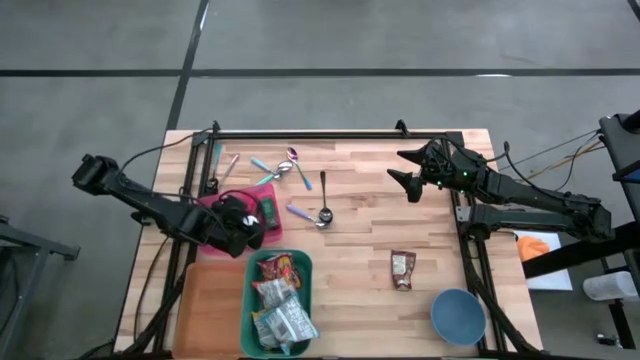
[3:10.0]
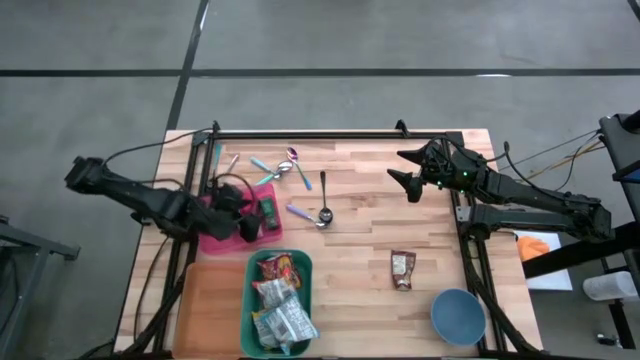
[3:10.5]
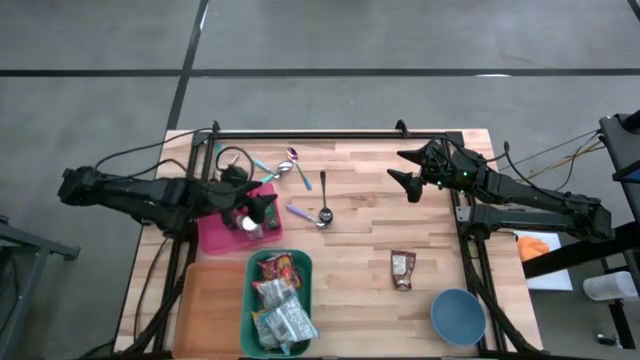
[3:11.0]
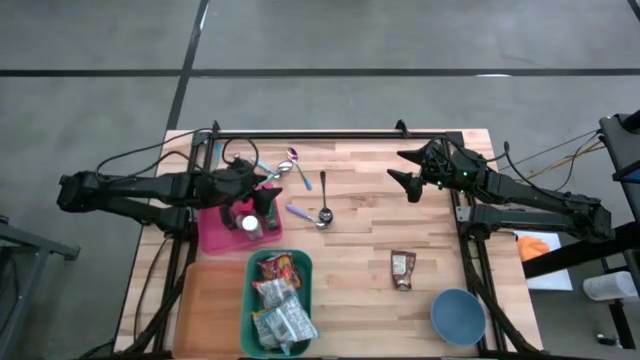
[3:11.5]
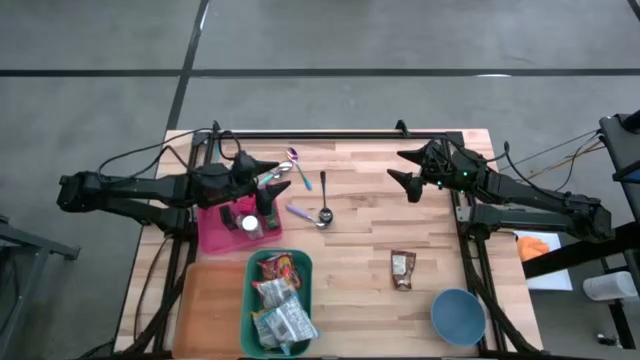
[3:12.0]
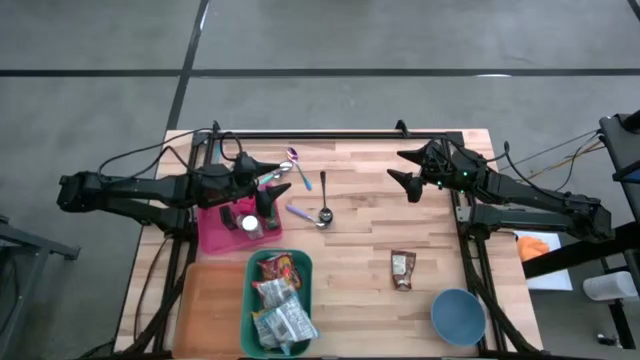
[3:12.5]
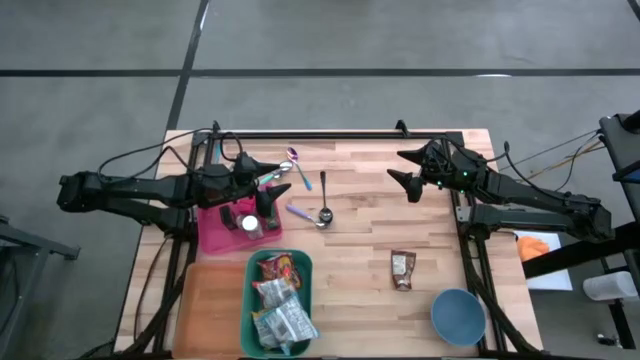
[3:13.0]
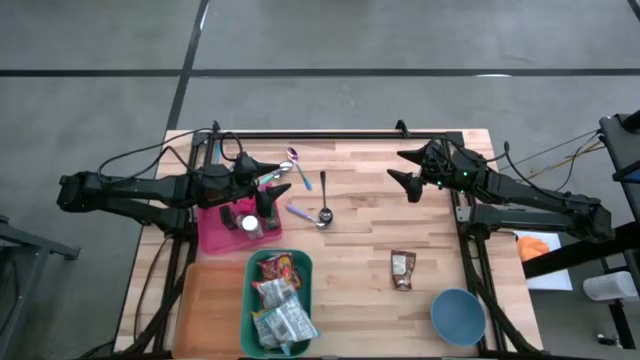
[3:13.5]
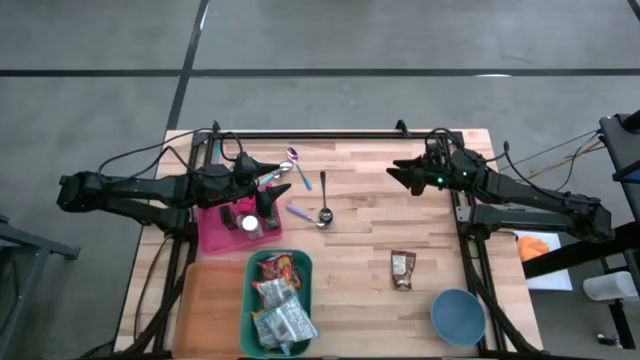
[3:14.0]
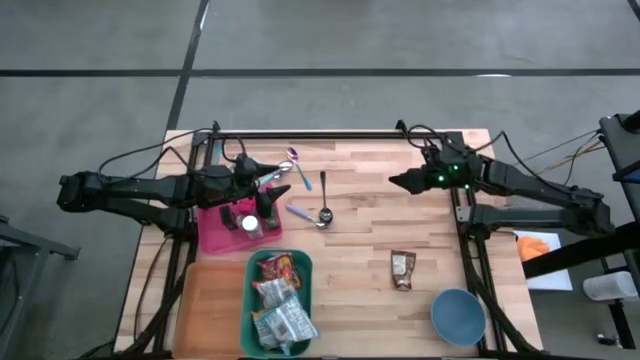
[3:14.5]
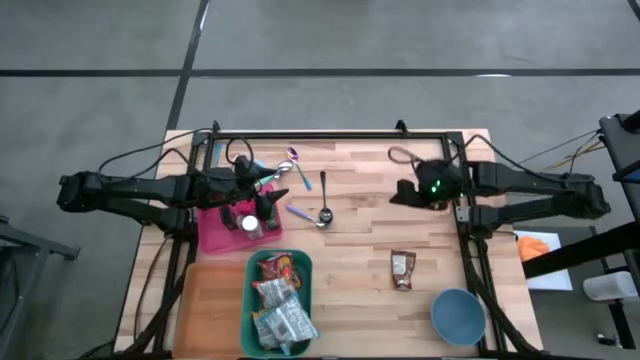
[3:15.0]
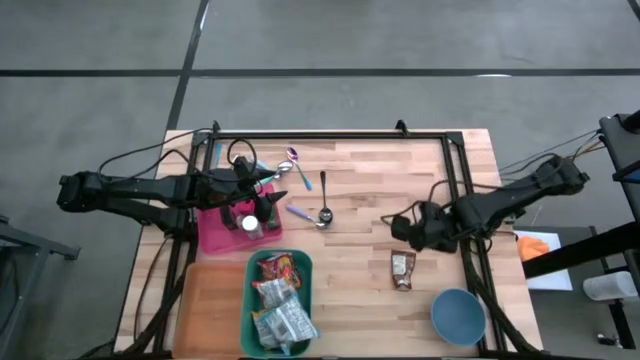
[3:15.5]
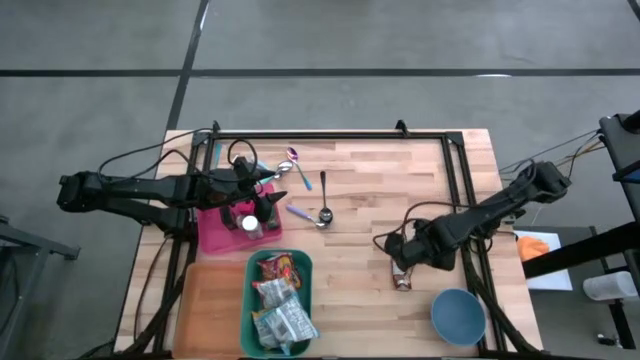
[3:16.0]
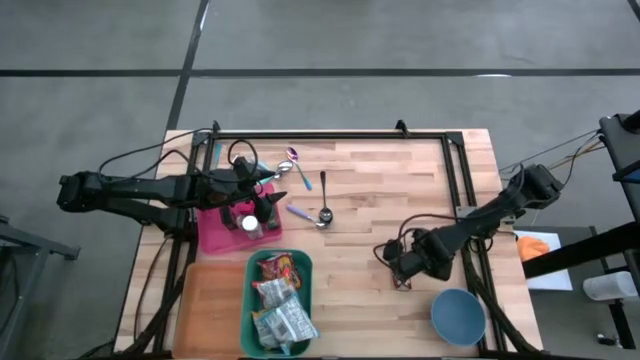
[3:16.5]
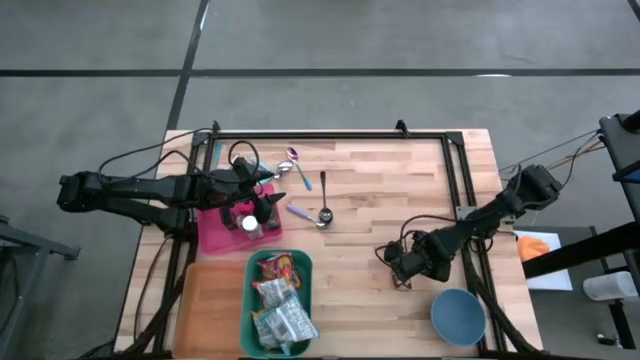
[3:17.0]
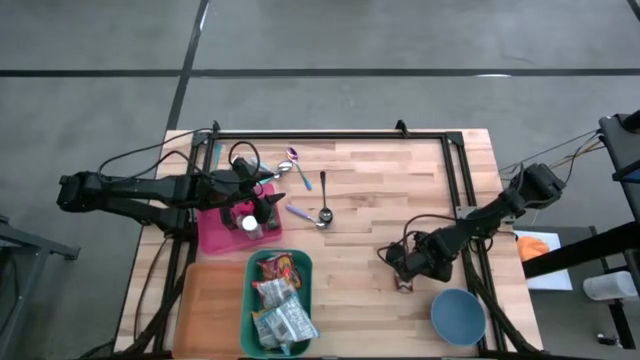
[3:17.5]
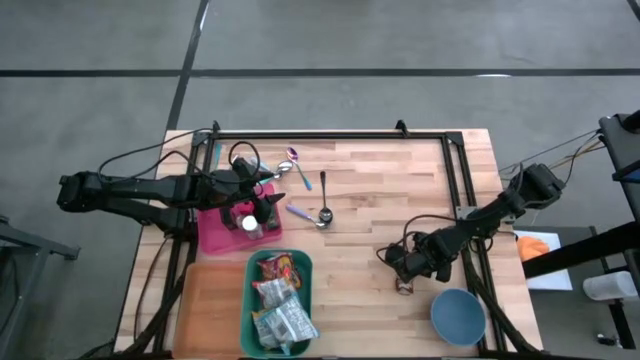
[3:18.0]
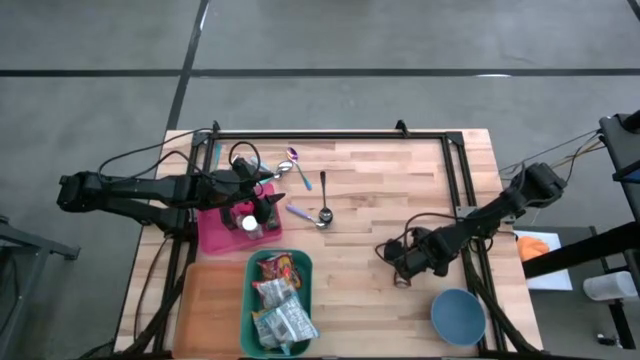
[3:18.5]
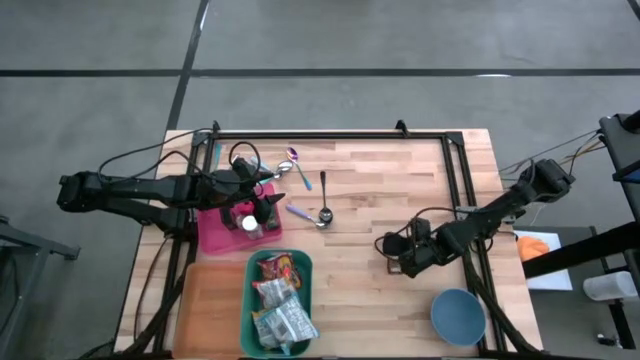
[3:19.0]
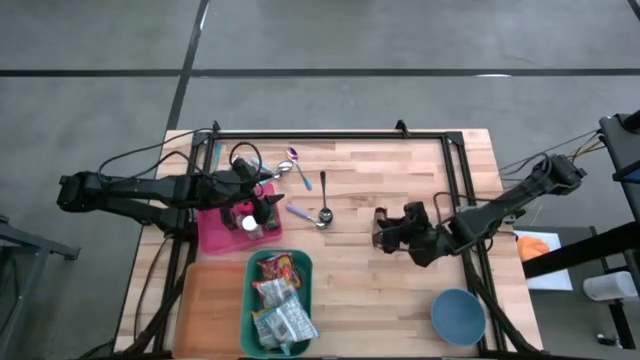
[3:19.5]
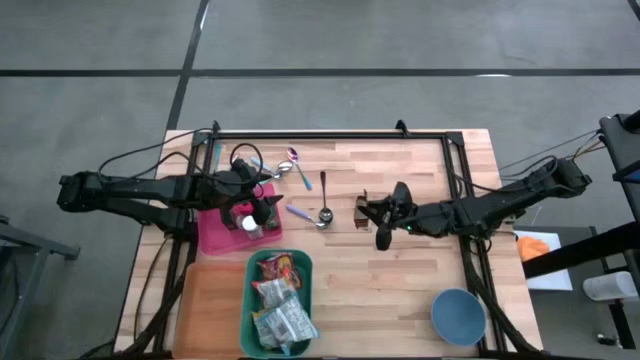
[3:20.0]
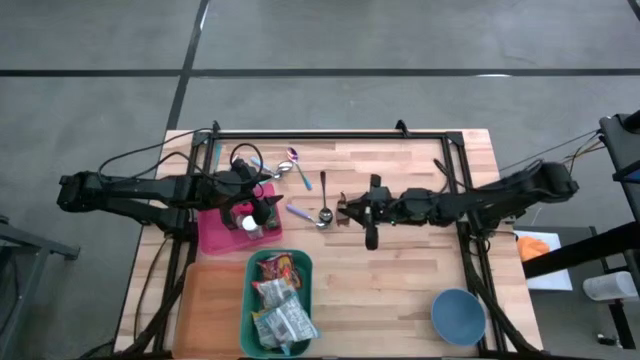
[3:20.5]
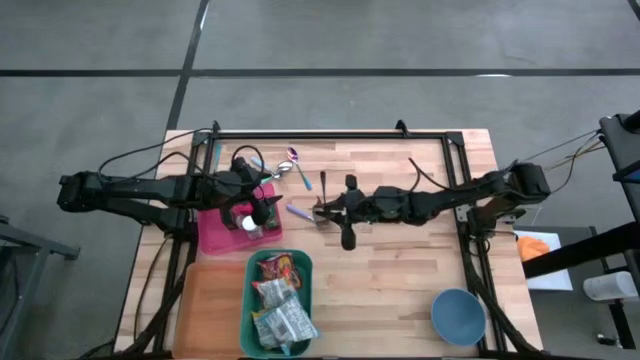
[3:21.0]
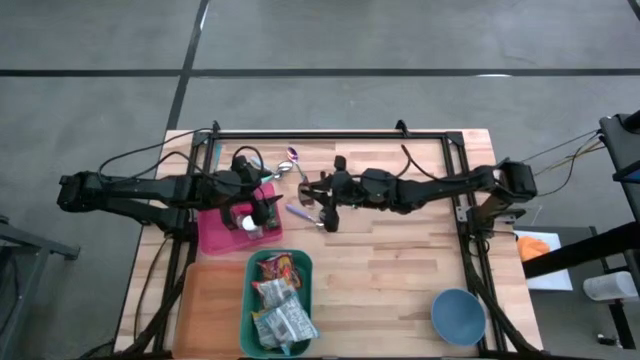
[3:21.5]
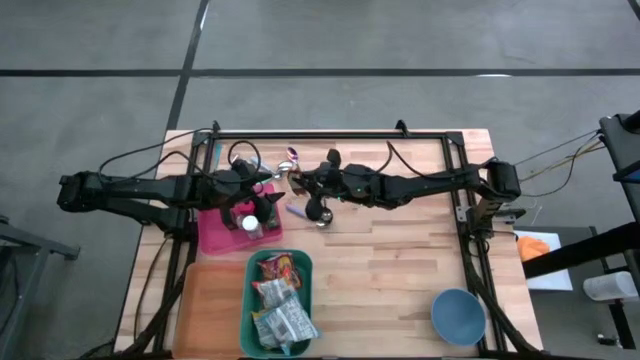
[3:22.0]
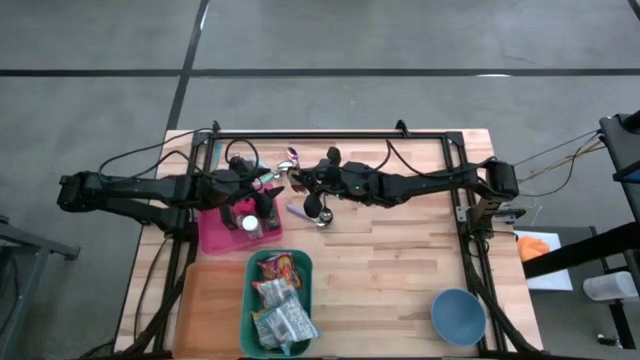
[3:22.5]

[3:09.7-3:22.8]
Put the orange seasoning pack into the pink bin
